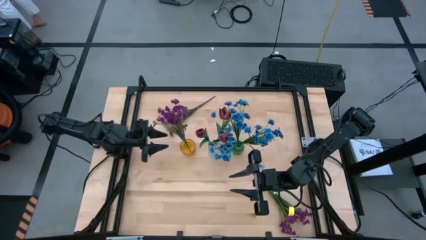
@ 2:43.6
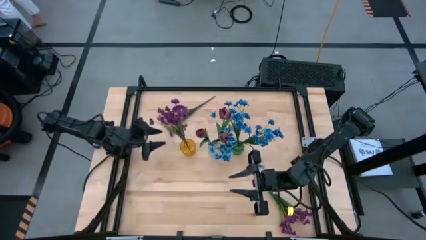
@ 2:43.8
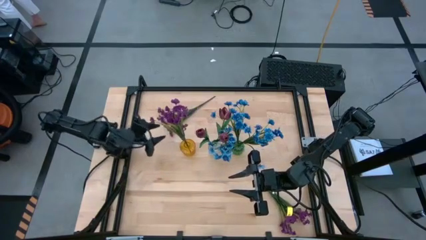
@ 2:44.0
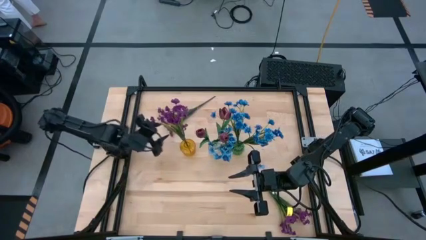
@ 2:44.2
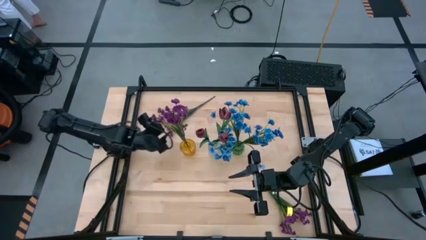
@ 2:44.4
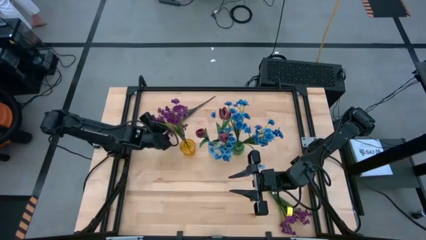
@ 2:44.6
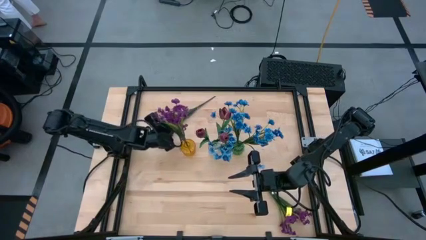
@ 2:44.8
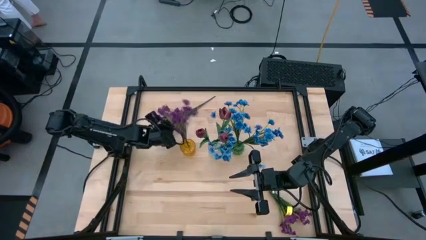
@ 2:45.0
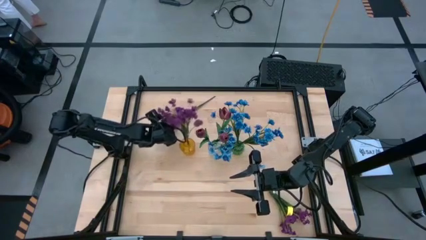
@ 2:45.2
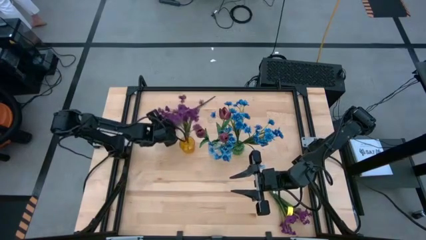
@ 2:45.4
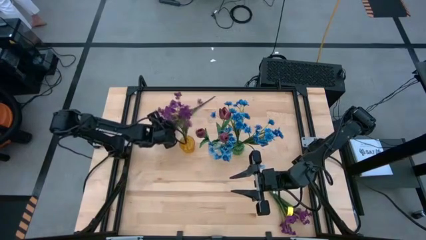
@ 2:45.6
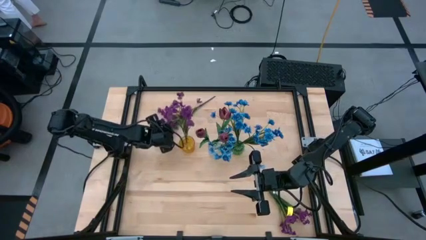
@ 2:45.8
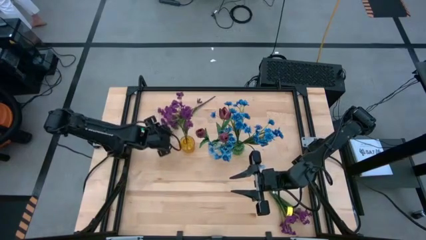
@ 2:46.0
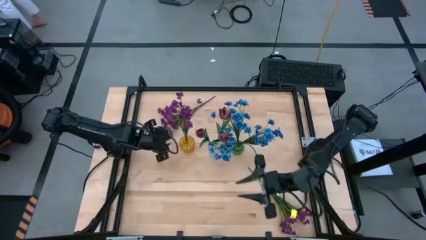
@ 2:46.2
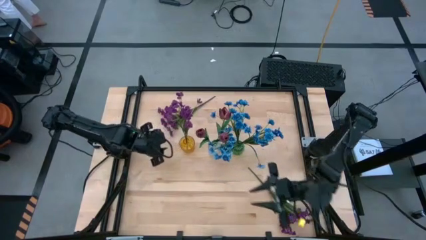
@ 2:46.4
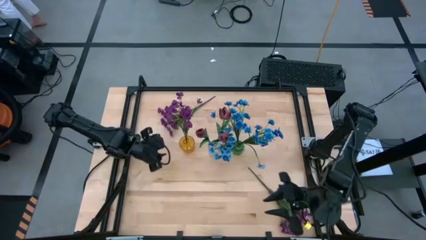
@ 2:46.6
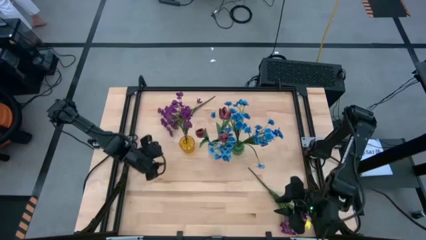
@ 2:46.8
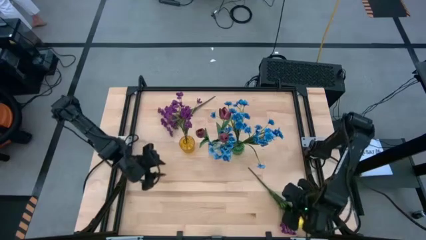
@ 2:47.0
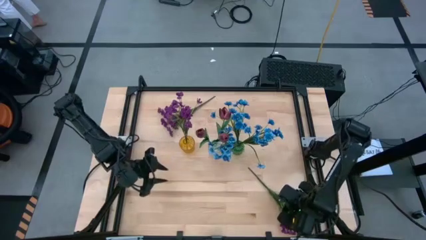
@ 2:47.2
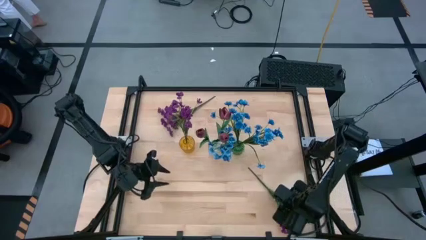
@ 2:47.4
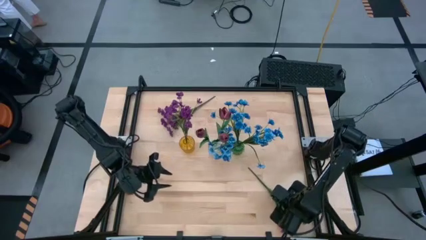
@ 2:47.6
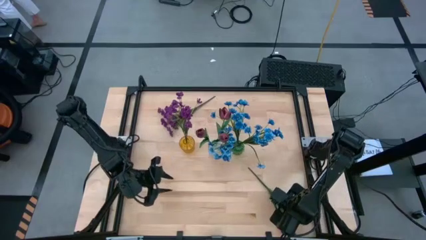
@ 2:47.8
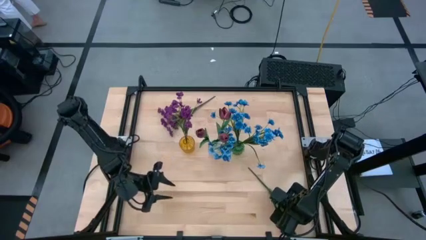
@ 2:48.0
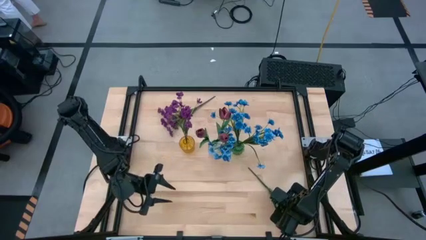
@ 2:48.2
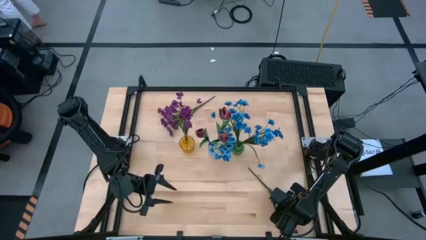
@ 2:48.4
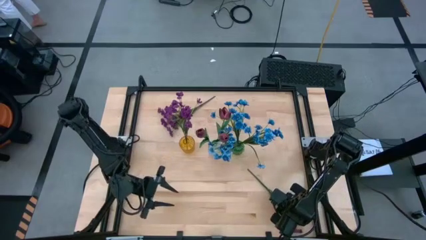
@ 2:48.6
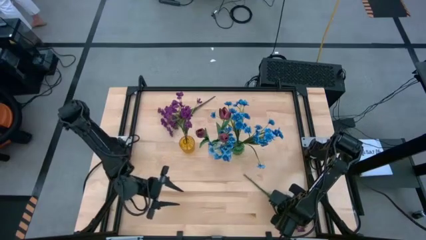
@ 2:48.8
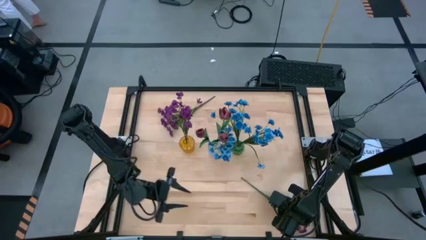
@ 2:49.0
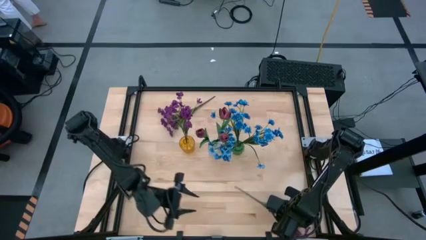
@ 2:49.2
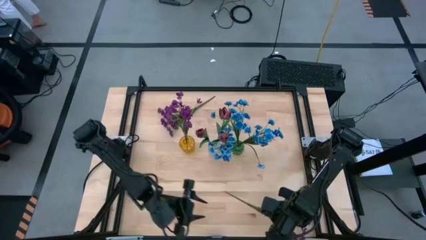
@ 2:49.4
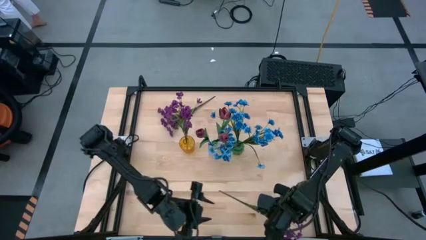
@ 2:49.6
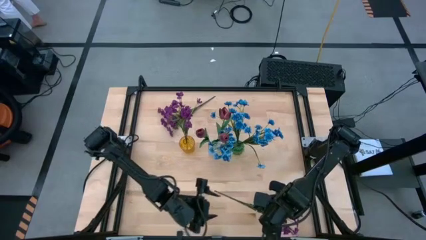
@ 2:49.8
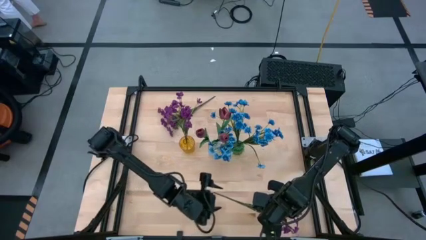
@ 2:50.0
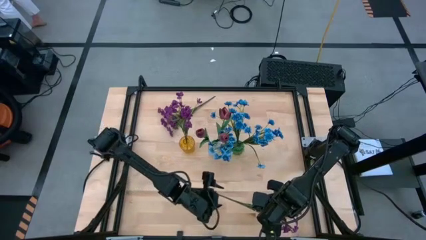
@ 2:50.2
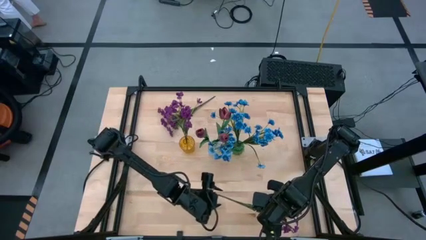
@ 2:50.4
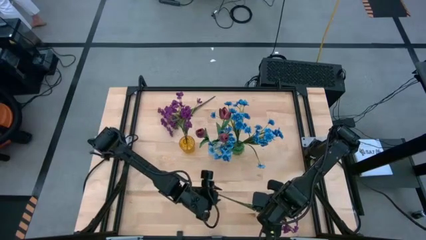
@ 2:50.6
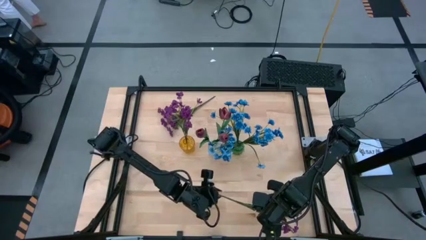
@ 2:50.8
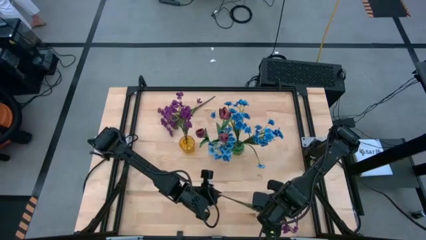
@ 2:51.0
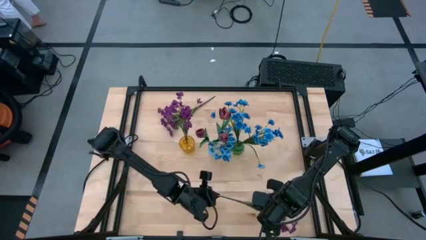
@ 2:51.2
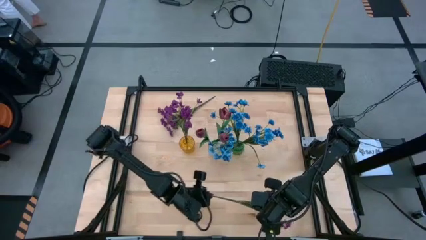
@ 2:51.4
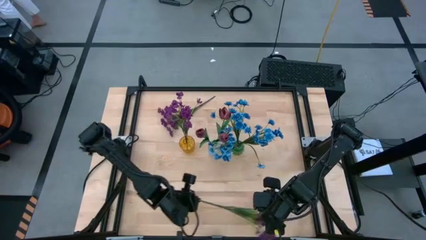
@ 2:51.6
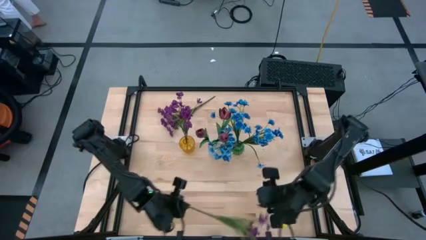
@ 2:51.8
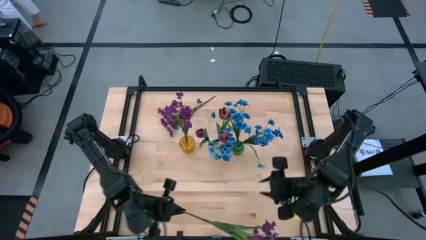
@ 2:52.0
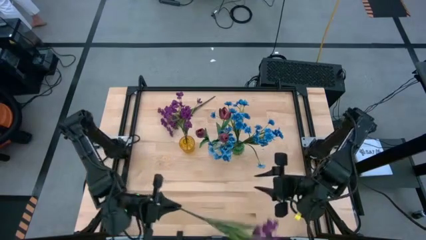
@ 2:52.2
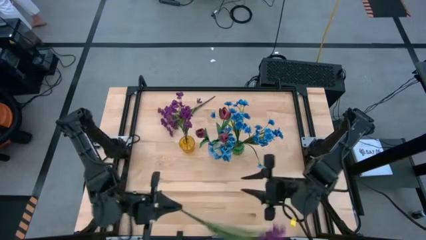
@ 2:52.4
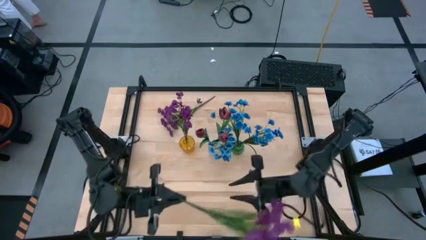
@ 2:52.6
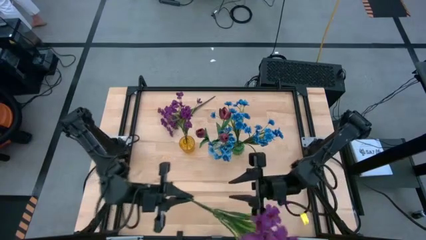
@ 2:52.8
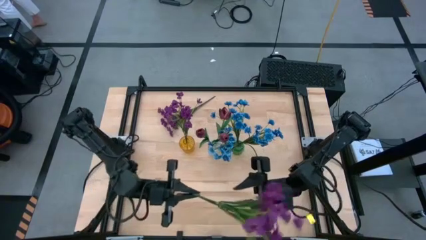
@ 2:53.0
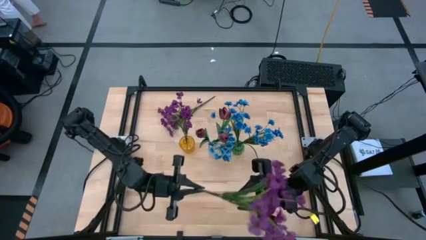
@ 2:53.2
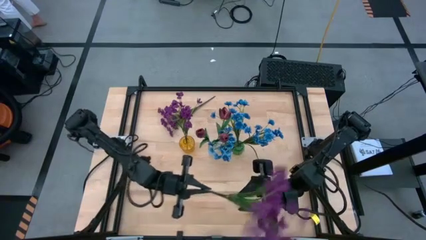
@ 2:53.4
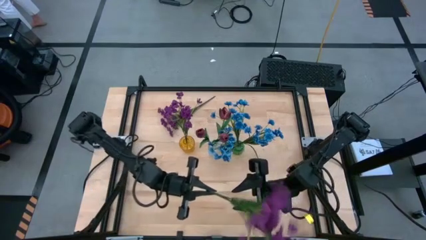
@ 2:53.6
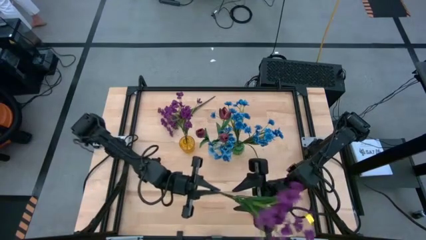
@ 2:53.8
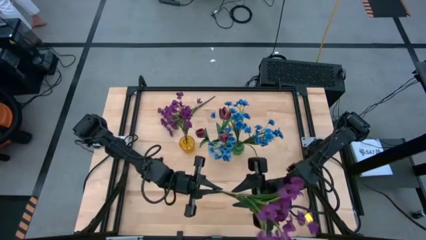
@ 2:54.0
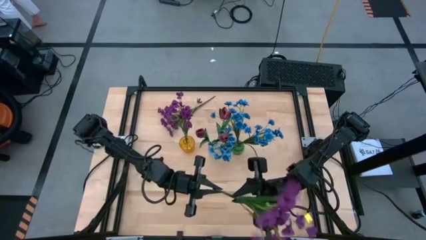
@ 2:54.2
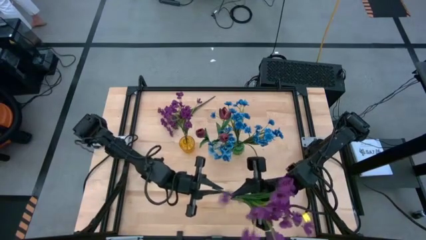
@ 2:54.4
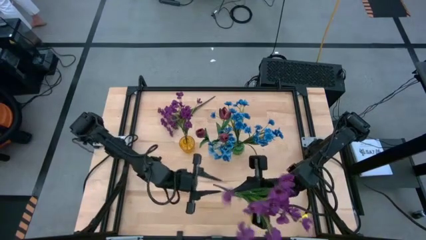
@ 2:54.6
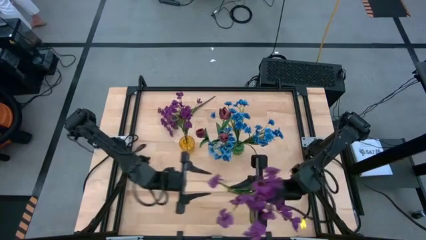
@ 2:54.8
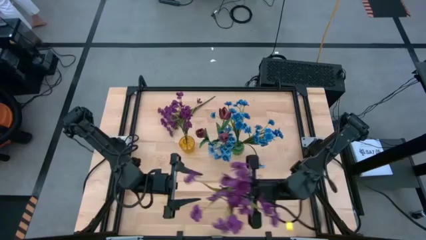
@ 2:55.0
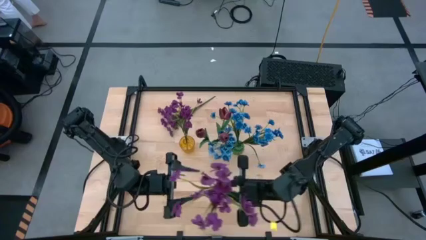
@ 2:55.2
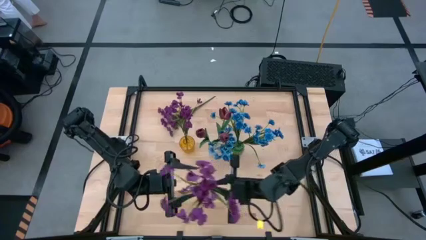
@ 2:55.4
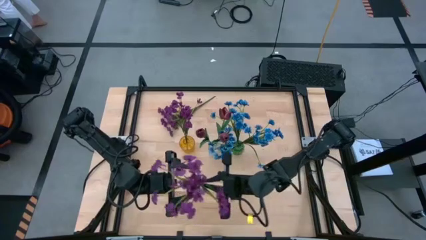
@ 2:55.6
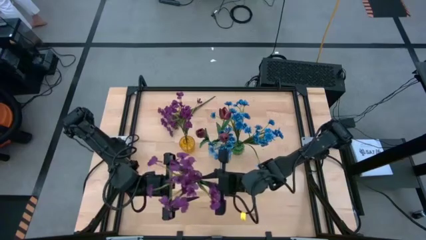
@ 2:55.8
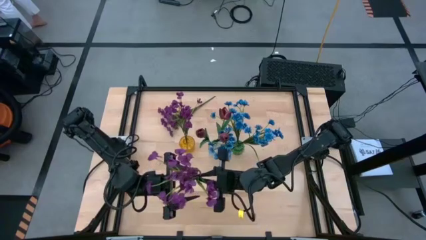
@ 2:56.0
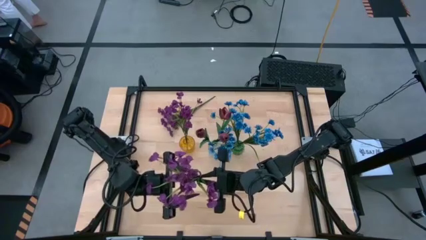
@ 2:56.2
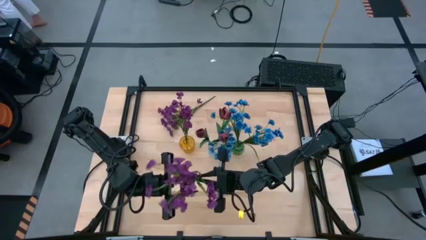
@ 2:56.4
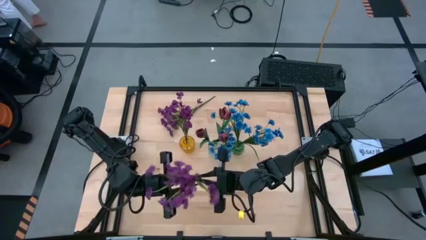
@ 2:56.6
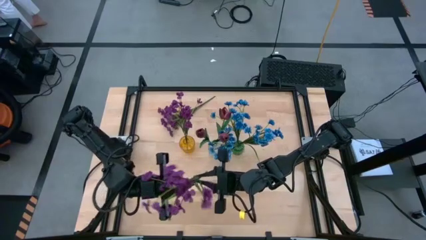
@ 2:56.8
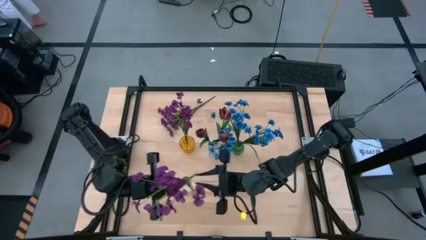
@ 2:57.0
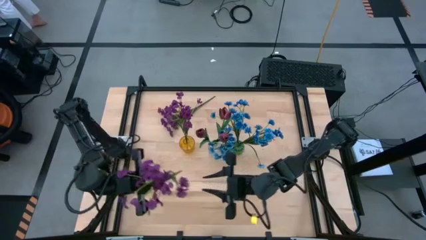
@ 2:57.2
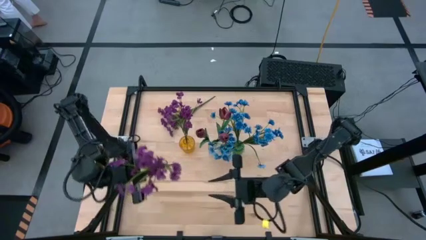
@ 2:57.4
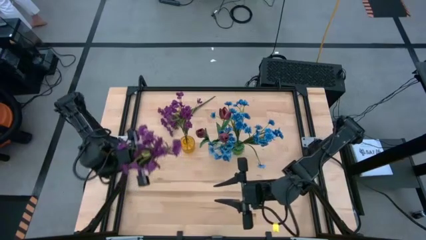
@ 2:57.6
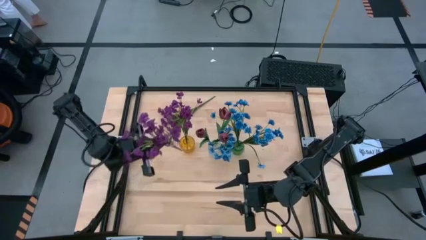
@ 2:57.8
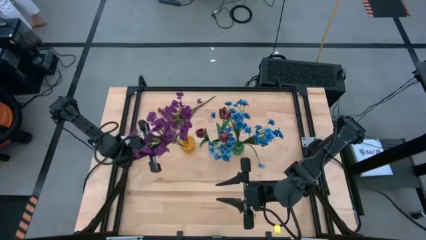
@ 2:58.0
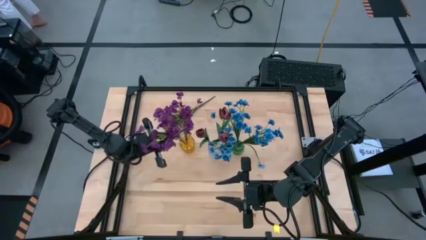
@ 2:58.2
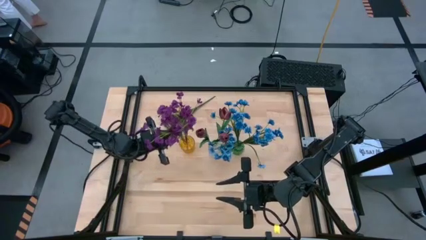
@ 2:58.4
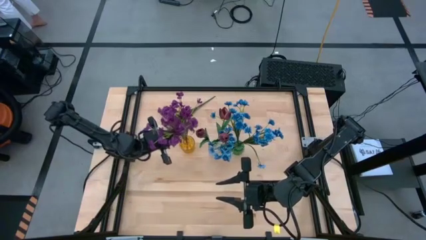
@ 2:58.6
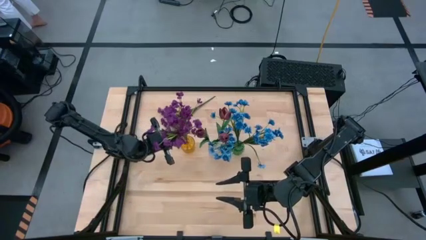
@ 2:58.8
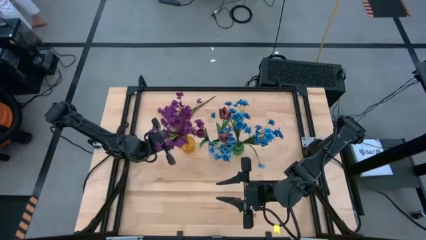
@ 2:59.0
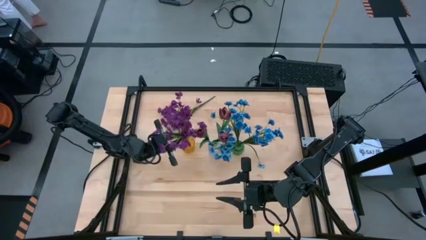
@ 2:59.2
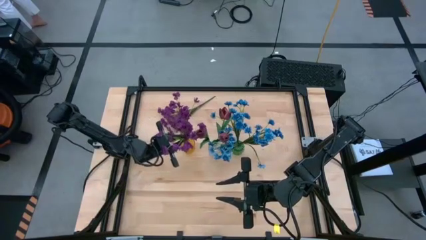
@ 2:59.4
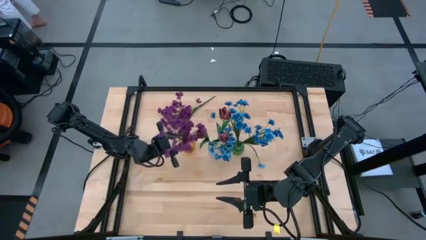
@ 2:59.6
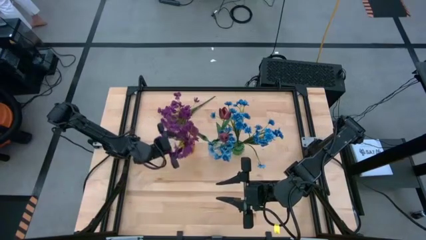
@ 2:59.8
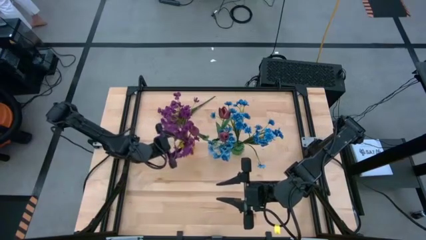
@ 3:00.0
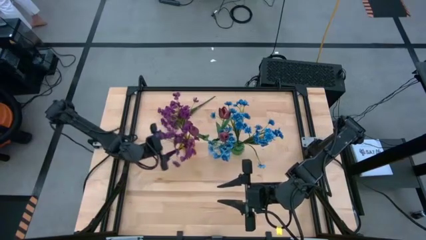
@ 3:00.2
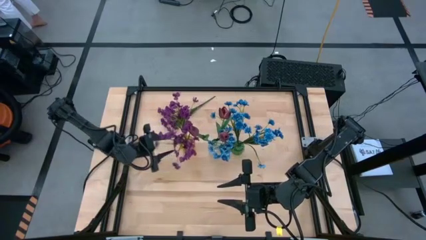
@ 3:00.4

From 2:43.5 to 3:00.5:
Task: Sort flowers into vase by color
Put the bottom purple flowers into the yellow vase
